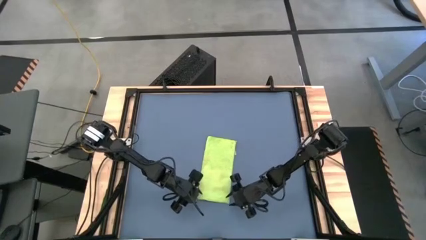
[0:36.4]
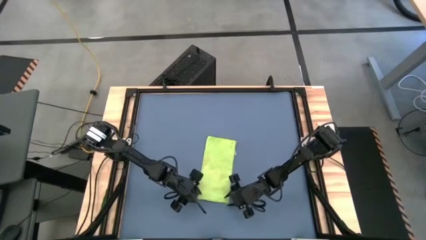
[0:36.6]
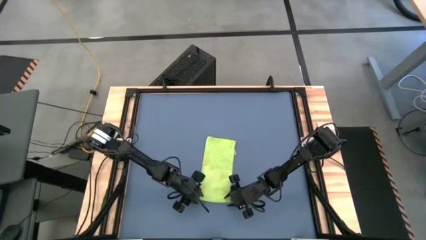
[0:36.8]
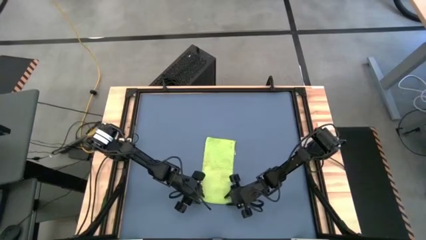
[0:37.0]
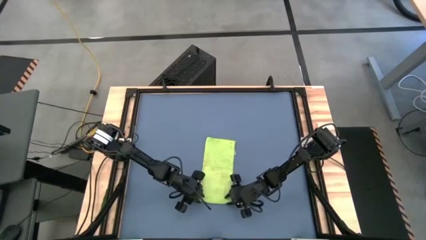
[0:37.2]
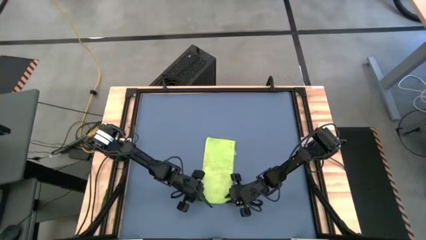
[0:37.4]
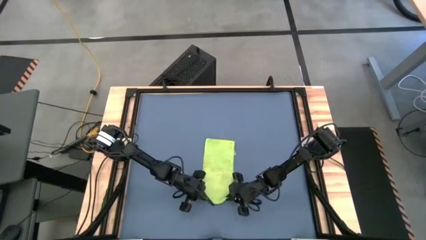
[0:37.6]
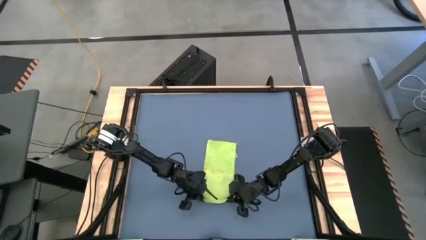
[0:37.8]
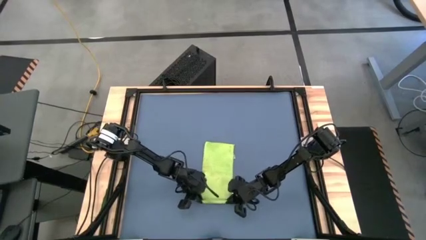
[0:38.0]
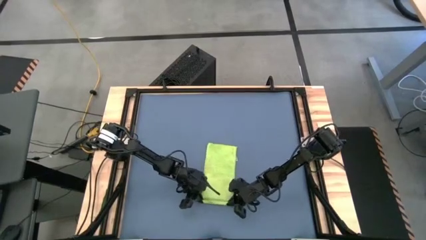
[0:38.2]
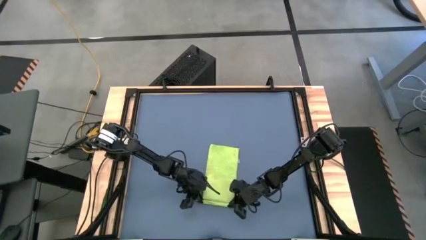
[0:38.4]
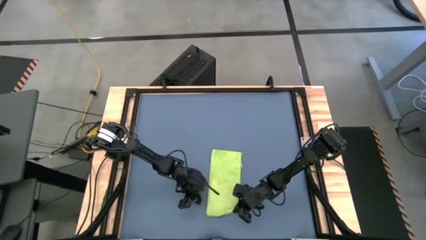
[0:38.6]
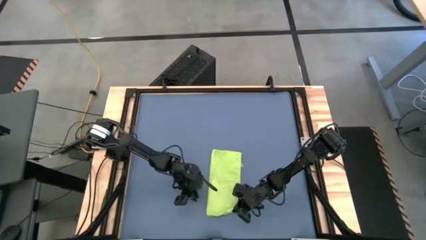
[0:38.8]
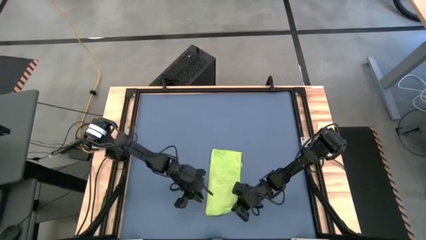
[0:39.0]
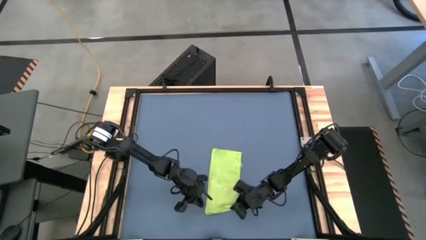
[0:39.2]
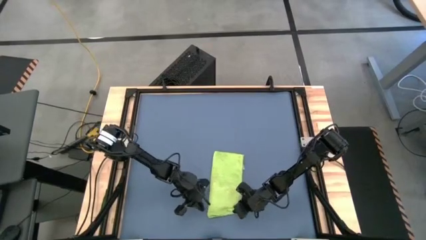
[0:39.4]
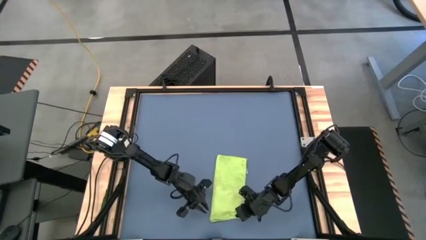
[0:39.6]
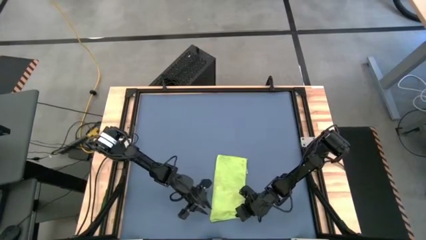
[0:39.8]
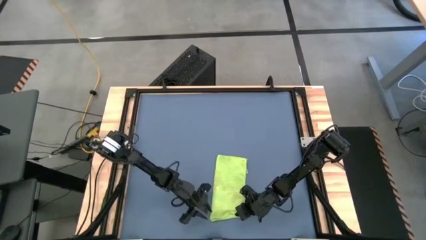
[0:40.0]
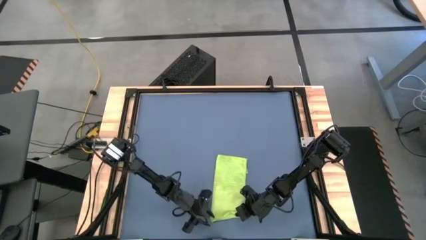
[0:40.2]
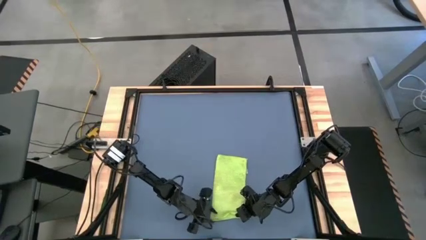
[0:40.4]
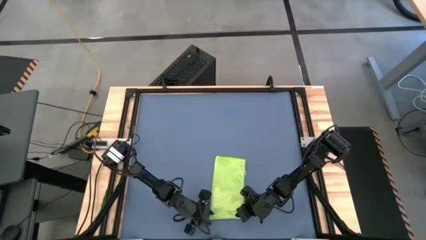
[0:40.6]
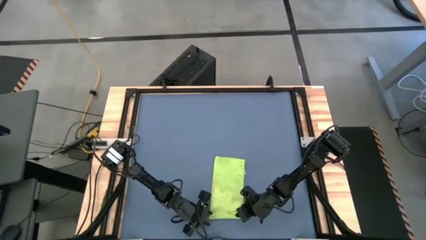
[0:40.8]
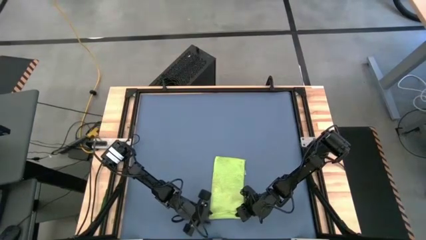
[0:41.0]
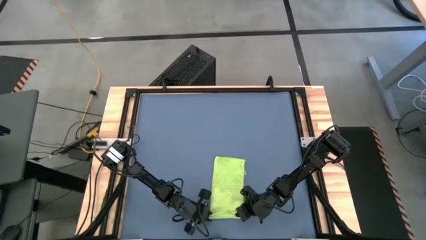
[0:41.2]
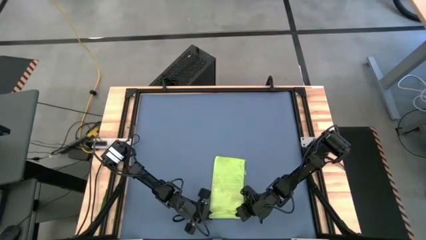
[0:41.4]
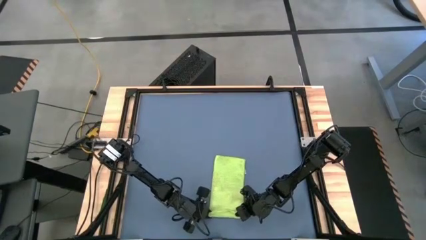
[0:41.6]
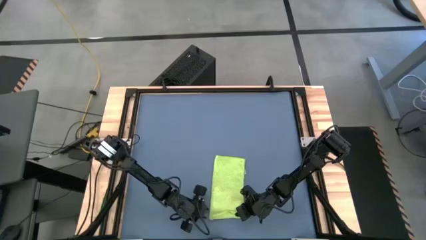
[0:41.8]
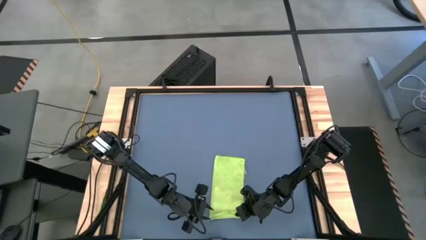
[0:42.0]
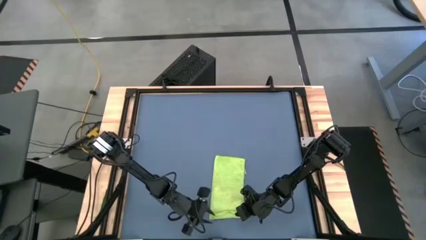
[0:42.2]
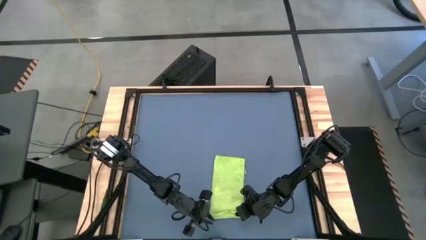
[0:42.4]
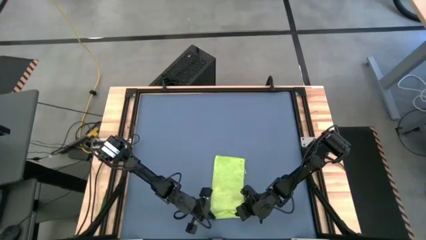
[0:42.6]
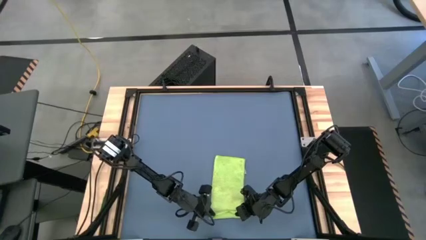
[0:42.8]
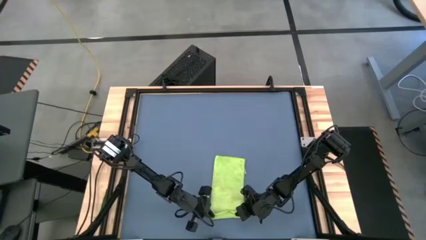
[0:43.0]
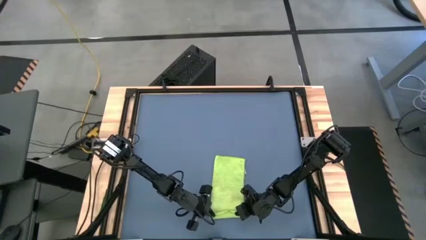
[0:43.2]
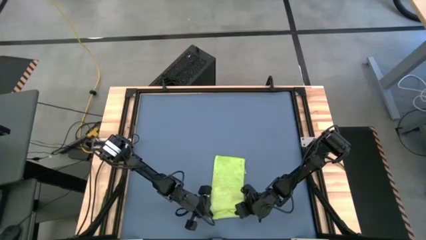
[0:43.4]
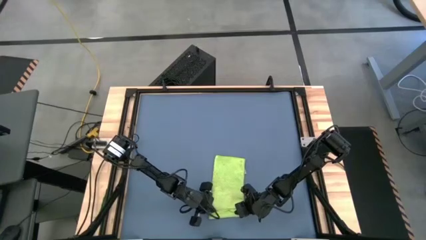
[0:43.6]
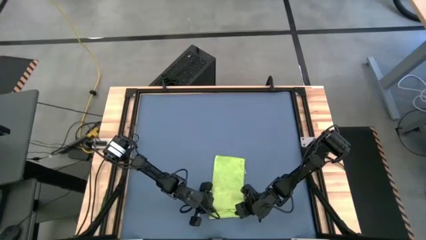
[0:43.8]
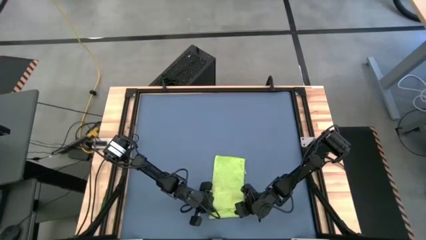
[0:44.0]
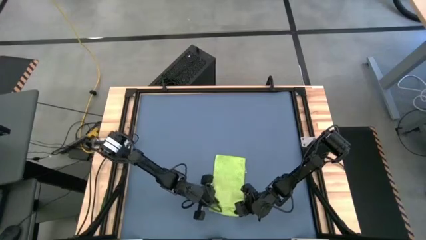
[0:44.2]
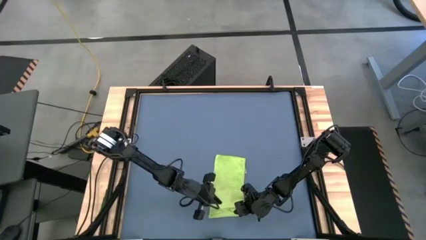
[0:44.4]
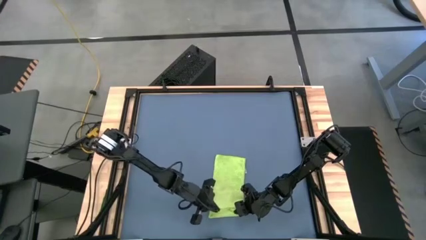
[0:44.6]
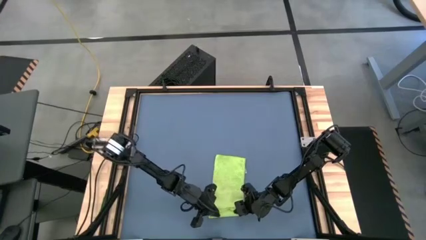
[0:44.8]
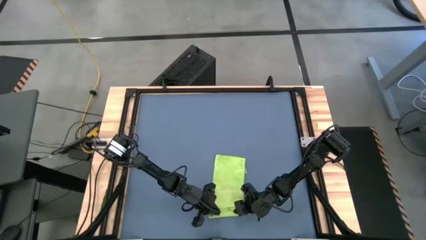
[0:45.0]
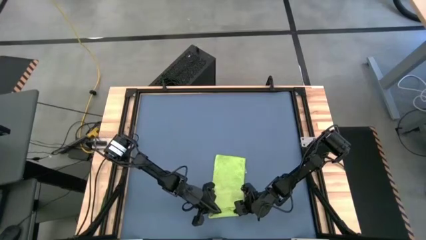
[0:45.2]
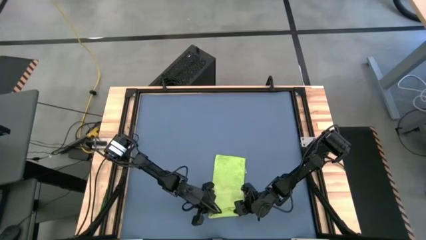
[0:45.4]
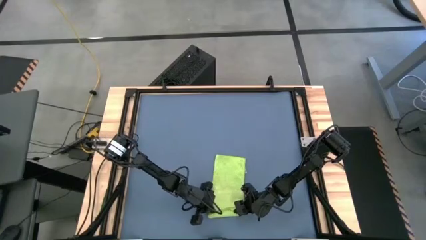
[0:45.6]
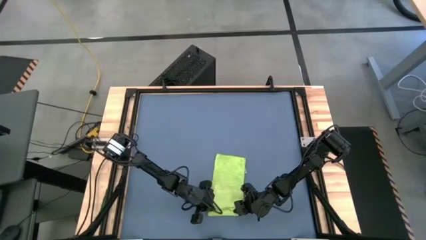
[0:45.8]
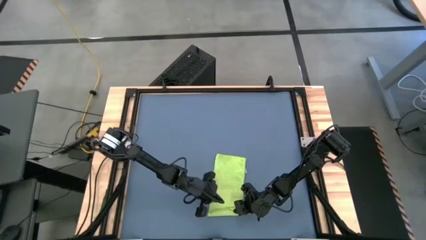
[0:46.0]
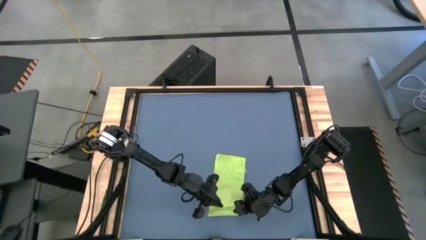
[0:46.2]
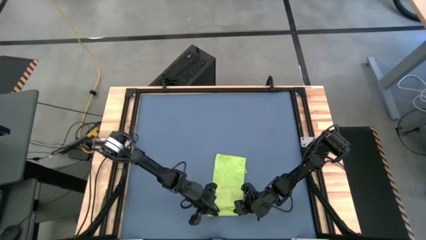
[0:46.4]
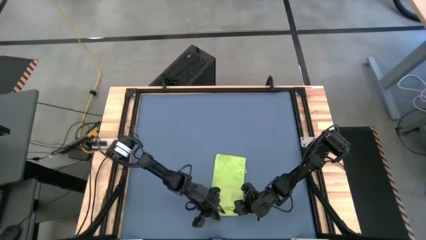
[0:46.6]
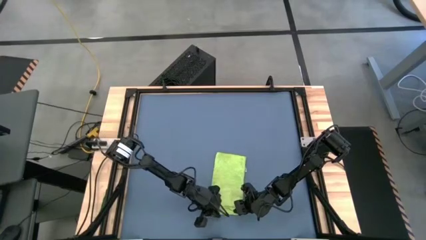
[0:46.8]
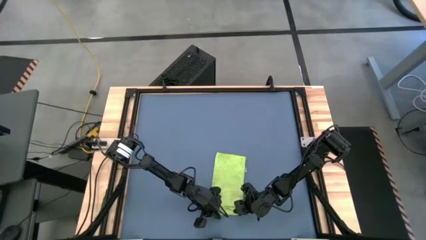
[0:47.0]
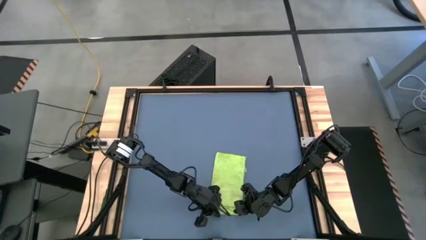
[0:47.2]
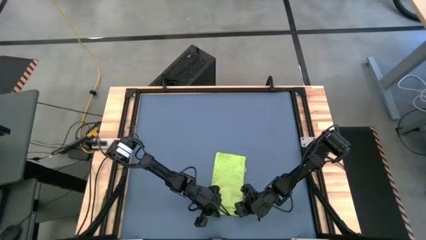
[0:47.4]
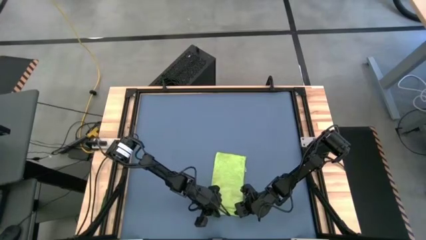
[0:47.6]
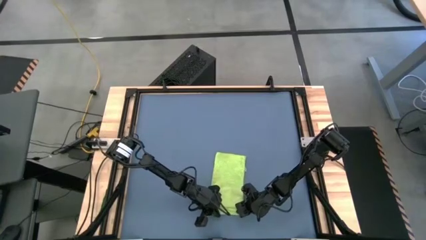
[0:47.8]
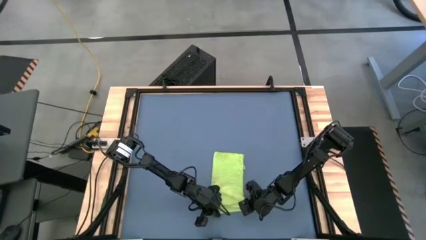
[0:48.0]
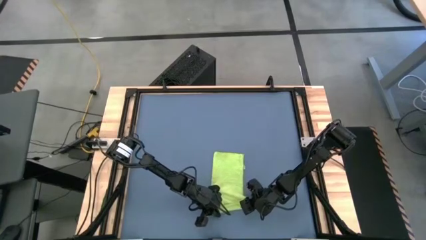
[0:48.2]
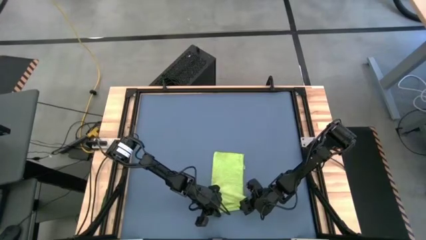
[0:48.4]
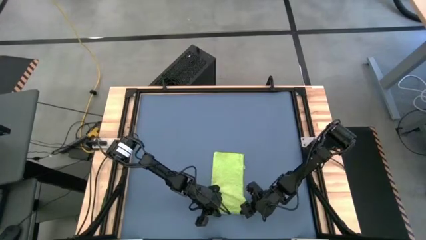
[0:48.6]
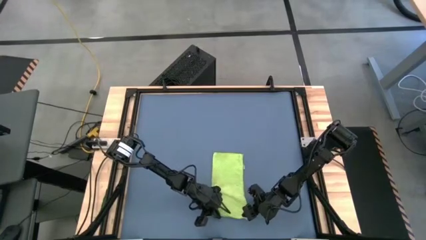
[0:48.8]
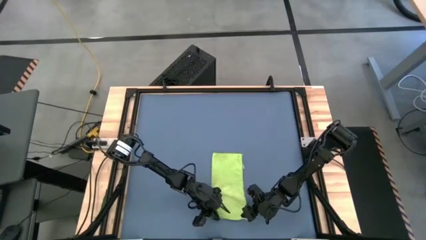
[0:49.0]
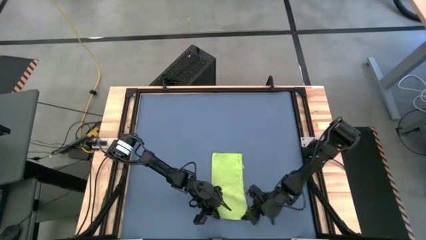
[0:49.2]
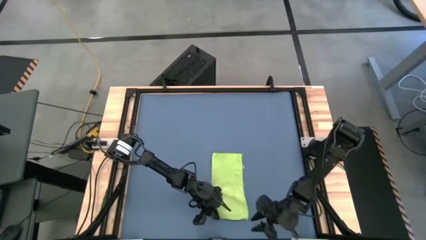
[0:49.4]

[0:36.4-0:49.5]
Task: Roll towel
Roll the green towel

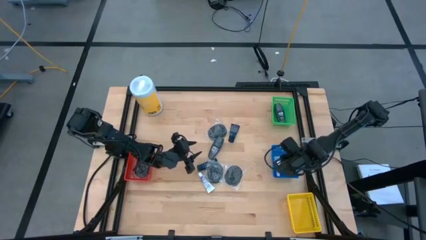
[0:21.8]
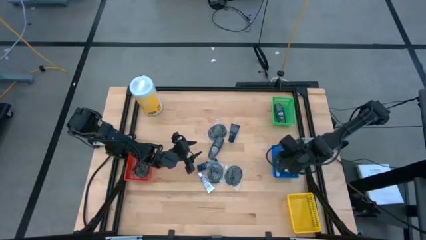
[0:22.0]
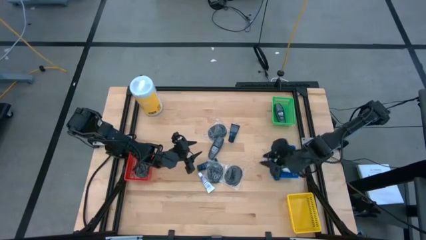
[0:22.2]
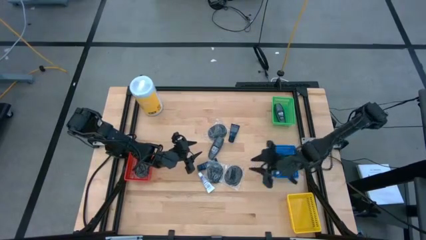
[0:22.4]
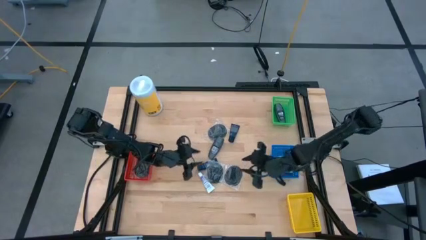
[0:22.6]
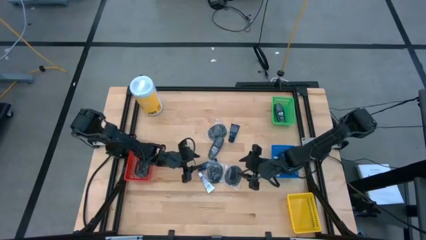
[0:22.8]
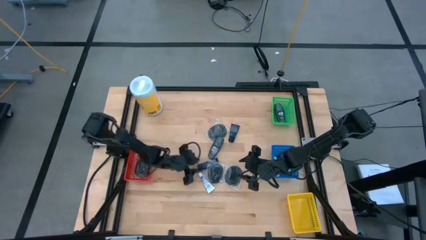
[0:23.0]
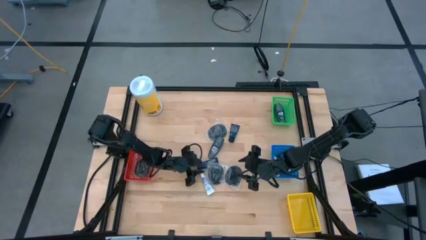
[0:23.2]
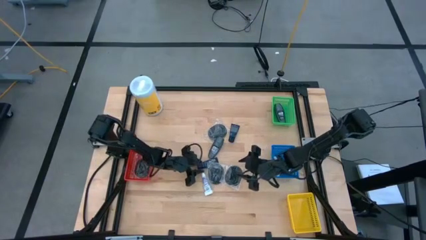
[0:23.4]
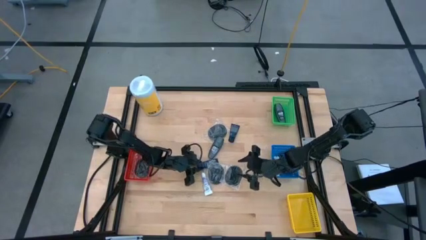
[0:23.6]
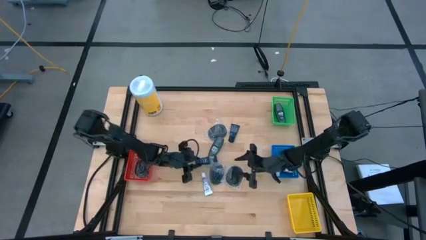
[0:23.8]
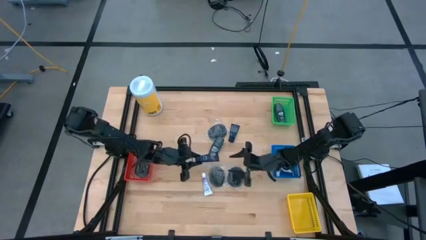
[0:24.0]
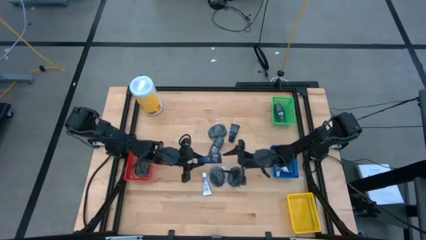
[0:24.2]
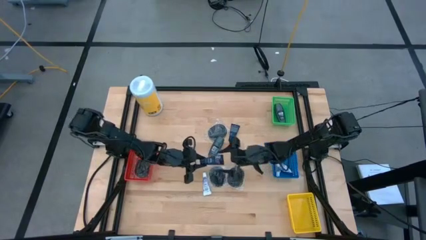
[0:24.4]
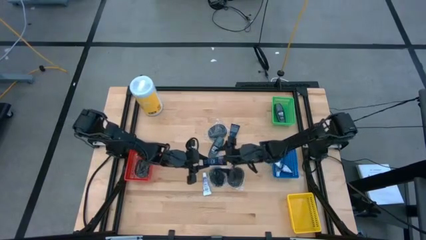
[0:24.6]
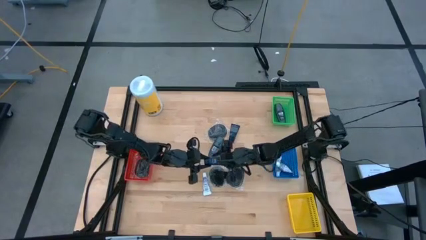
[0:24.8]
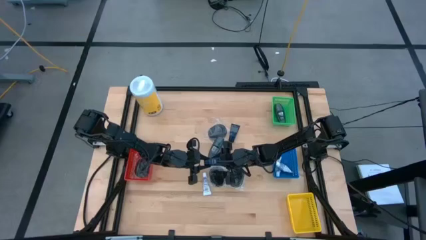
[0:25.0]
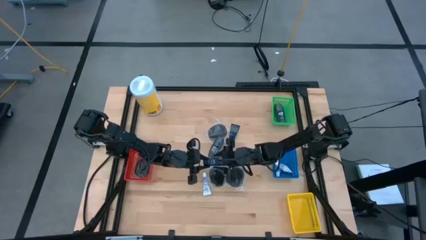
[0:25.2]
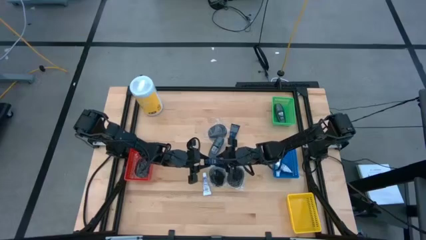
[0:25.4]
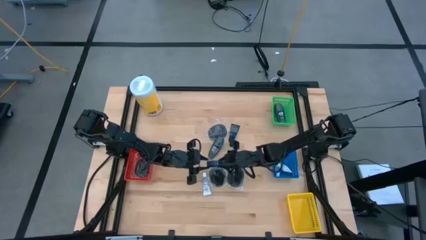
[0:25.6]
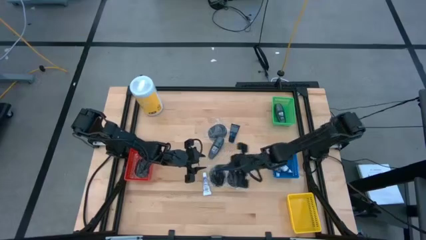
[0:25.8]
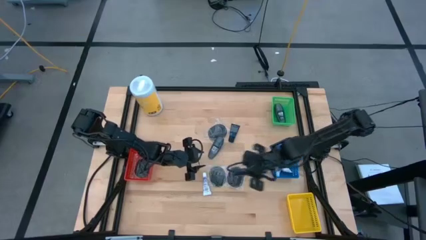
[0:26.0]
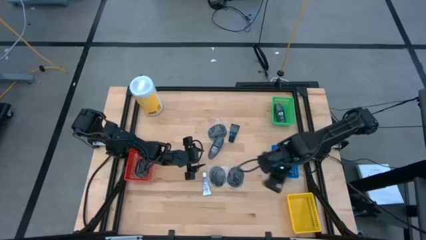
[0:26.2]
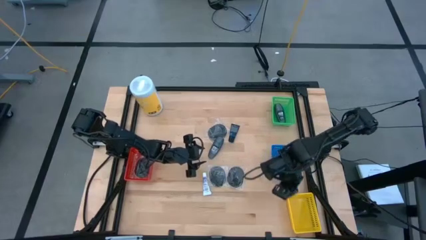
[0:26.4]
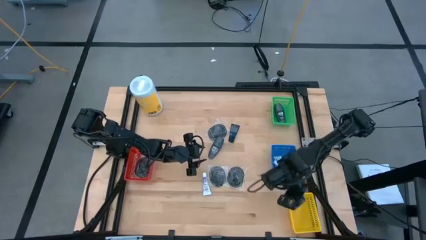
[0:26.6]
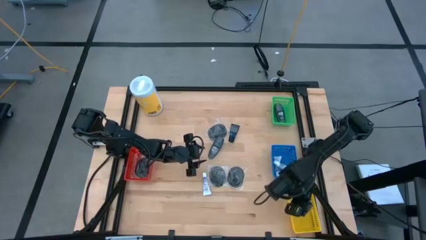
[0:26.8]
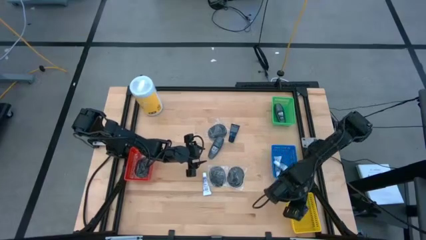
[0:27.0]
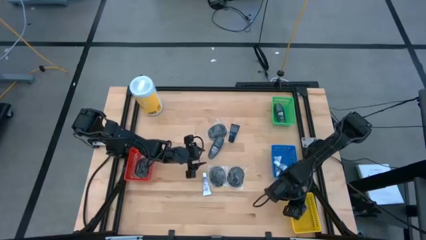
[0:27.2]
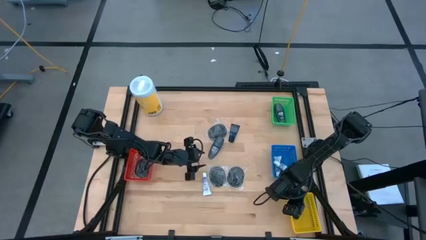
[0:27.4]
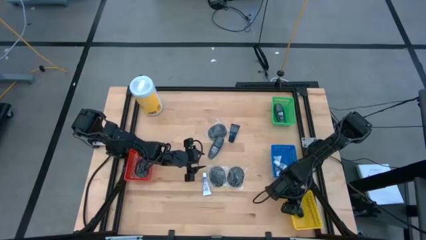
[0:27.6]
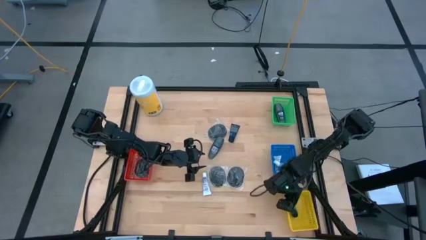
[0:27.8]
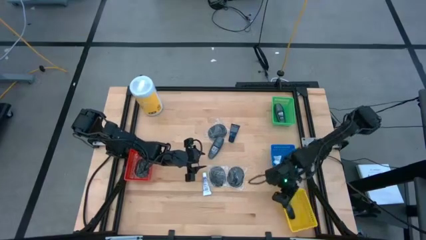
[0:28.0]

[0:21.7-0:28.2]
Task: Pick & Place Travel size toiletries
Put the shave cream into the yellow bin
